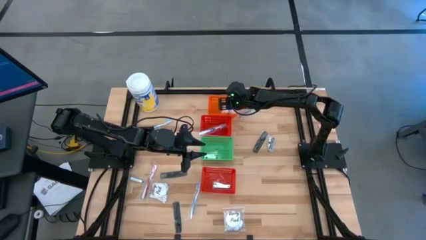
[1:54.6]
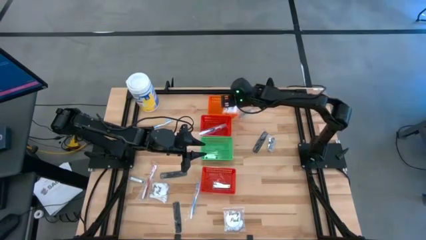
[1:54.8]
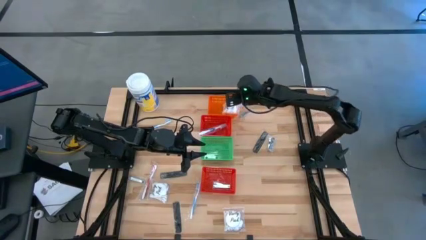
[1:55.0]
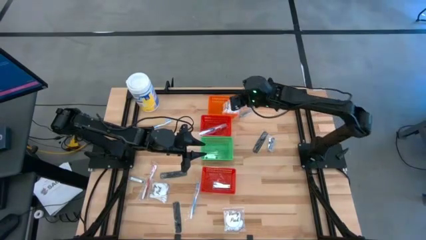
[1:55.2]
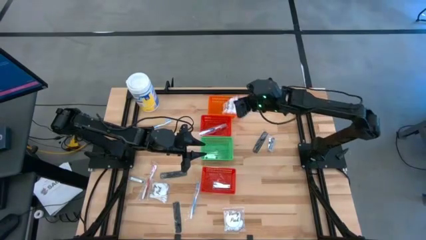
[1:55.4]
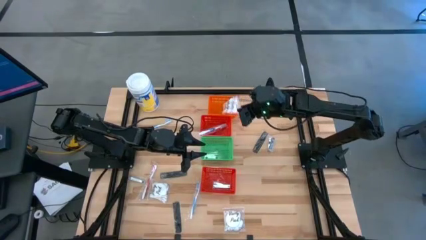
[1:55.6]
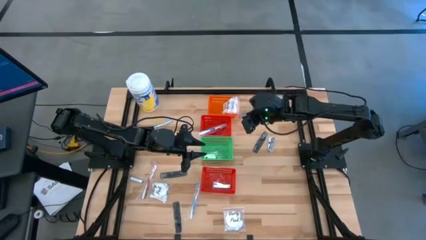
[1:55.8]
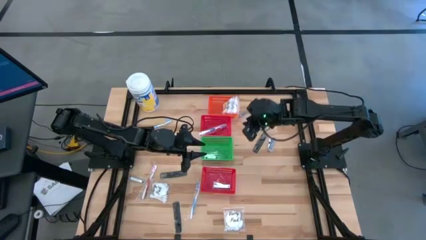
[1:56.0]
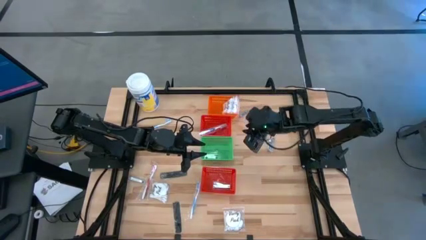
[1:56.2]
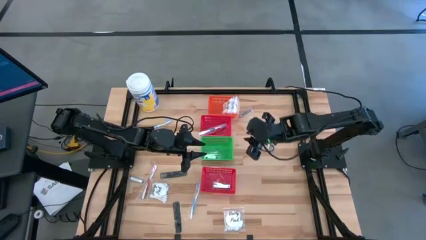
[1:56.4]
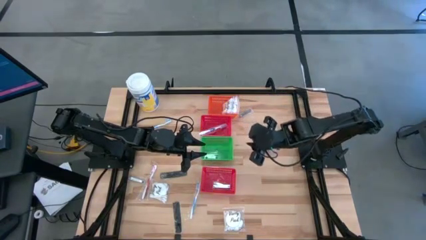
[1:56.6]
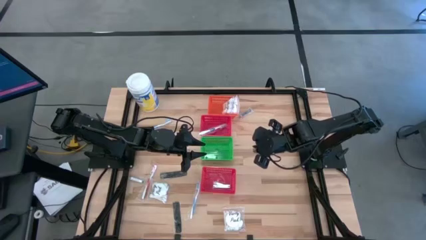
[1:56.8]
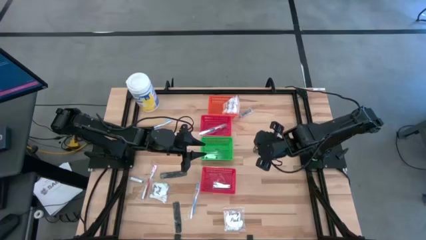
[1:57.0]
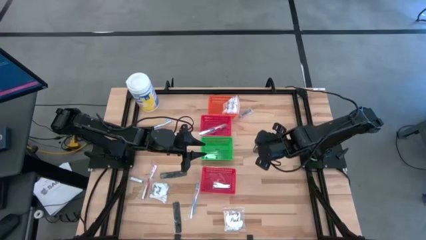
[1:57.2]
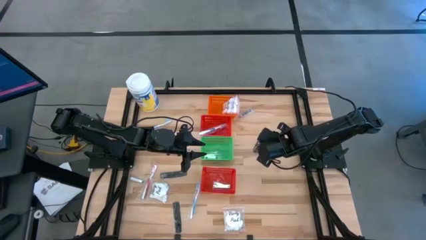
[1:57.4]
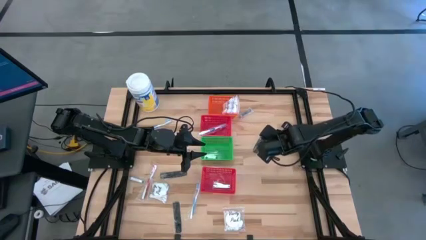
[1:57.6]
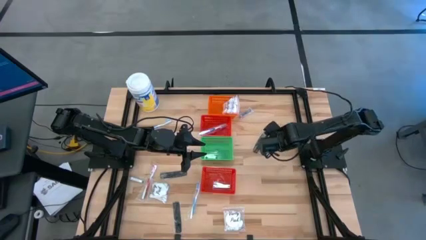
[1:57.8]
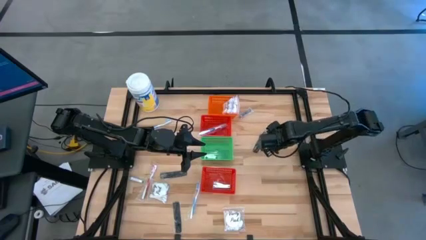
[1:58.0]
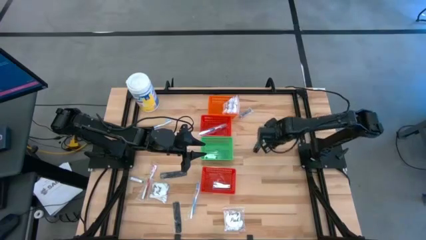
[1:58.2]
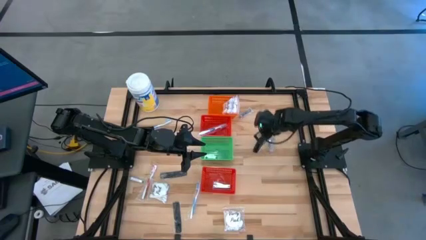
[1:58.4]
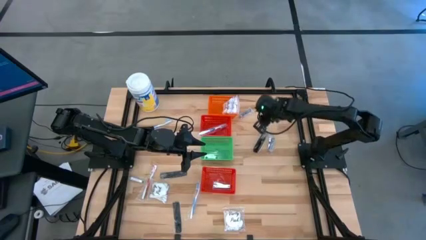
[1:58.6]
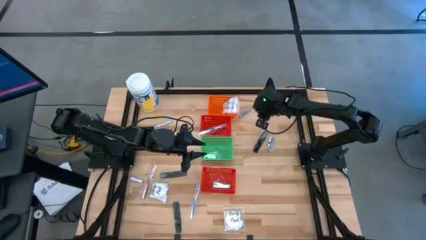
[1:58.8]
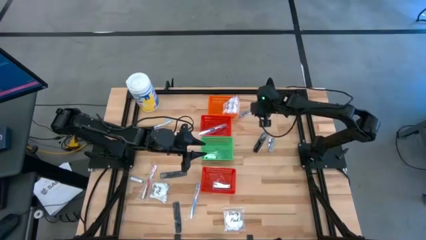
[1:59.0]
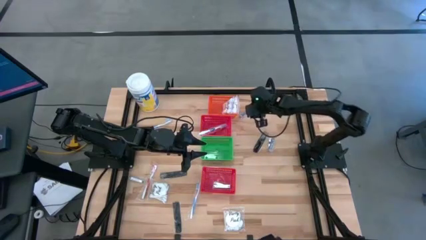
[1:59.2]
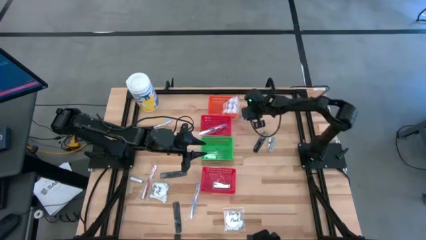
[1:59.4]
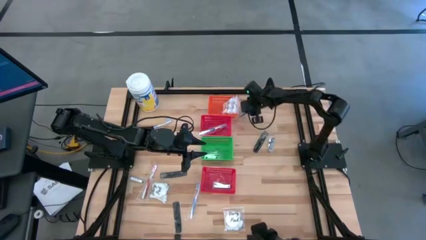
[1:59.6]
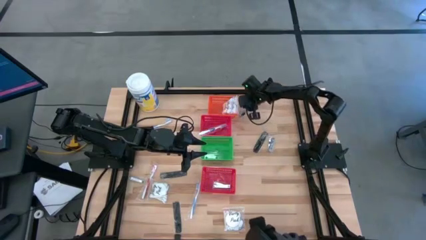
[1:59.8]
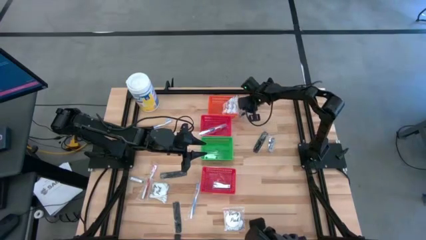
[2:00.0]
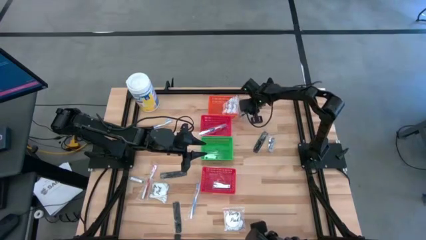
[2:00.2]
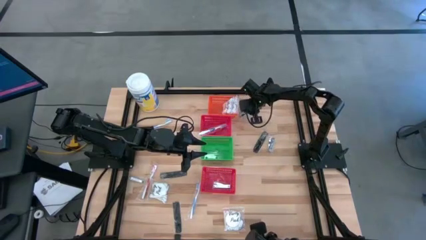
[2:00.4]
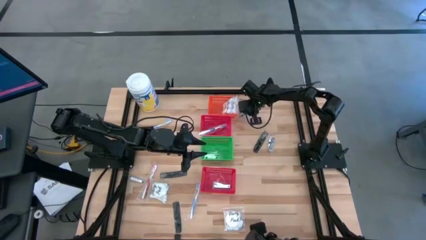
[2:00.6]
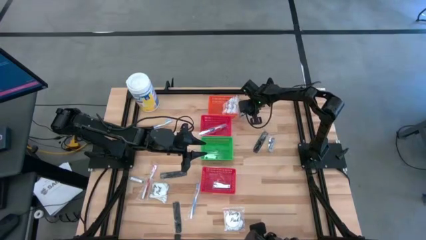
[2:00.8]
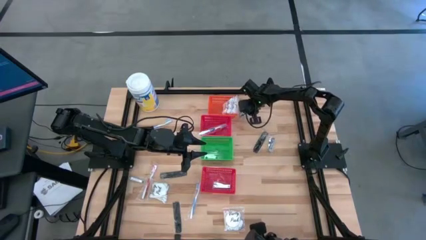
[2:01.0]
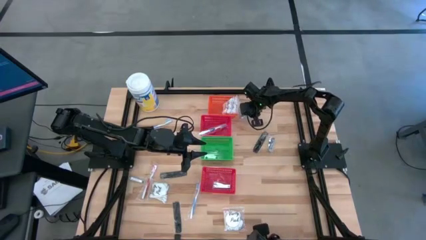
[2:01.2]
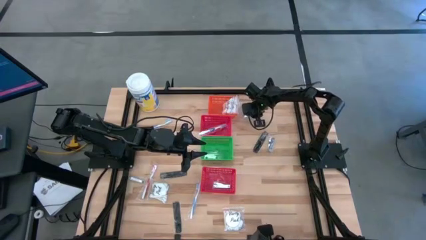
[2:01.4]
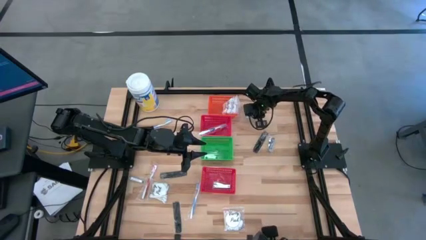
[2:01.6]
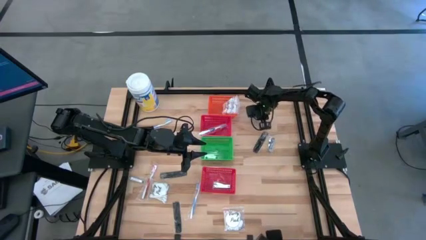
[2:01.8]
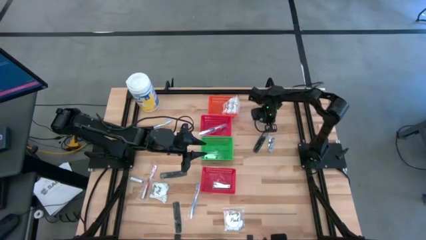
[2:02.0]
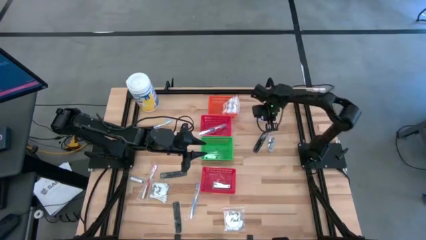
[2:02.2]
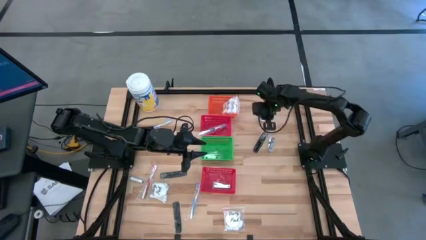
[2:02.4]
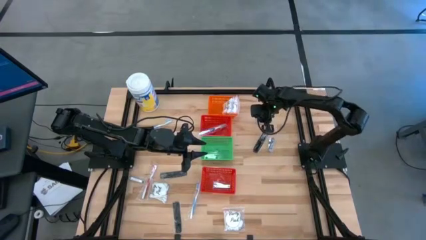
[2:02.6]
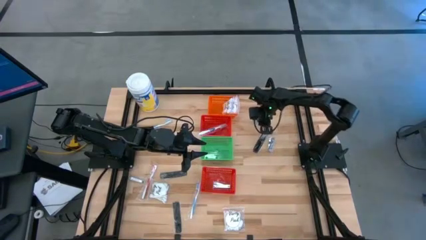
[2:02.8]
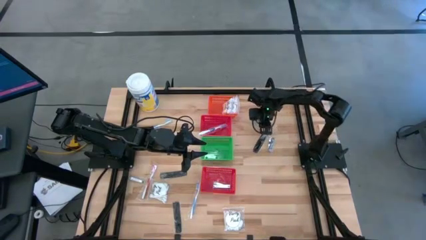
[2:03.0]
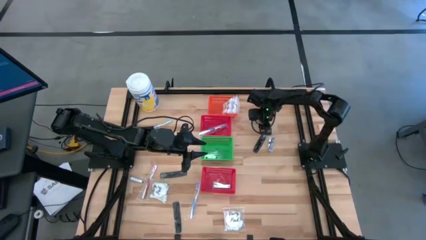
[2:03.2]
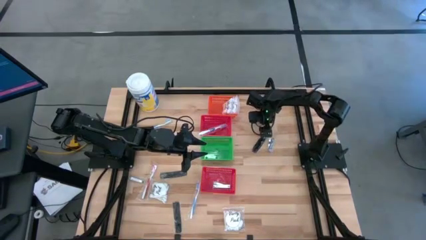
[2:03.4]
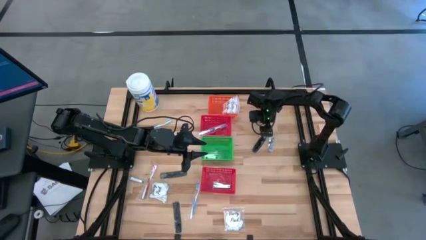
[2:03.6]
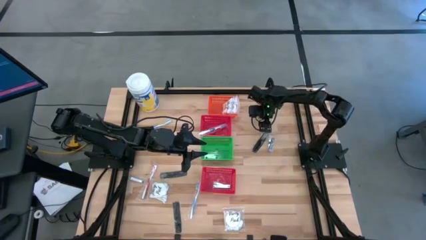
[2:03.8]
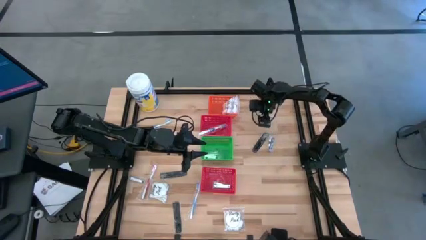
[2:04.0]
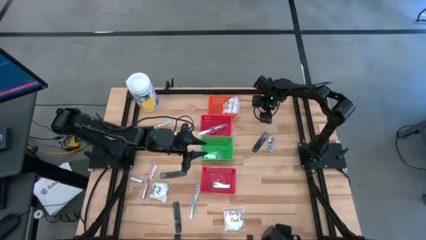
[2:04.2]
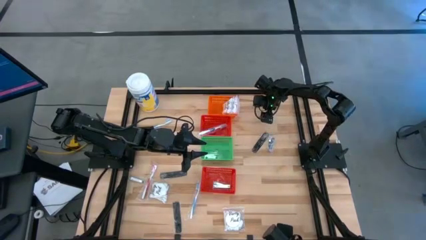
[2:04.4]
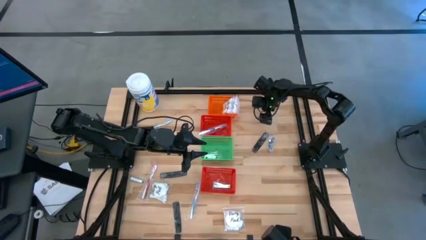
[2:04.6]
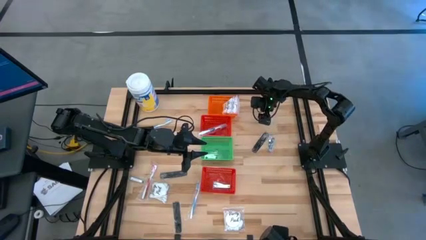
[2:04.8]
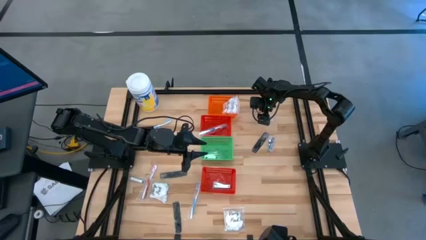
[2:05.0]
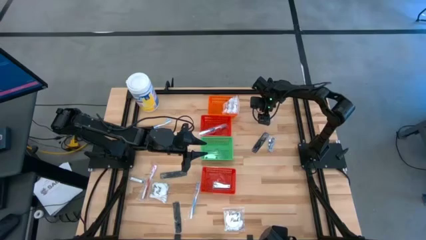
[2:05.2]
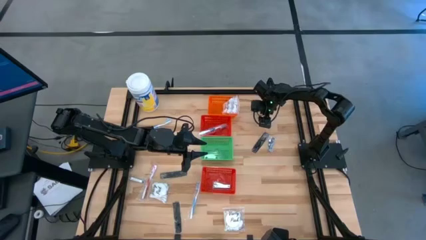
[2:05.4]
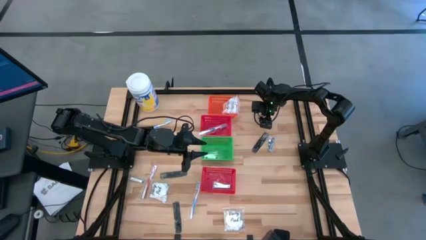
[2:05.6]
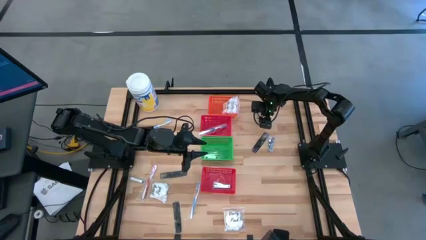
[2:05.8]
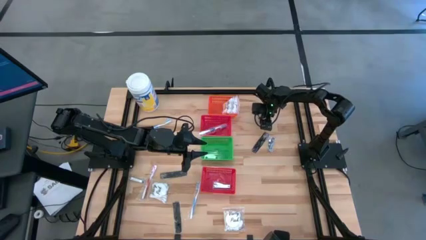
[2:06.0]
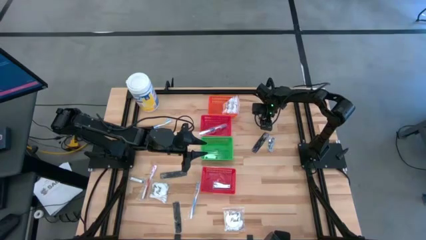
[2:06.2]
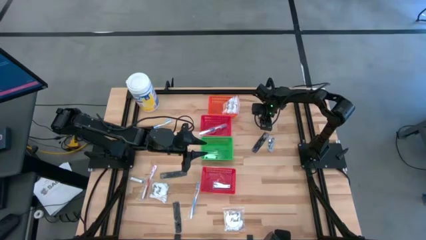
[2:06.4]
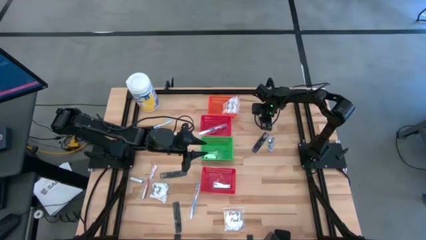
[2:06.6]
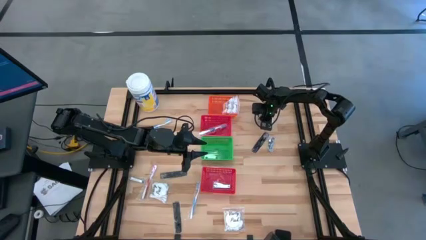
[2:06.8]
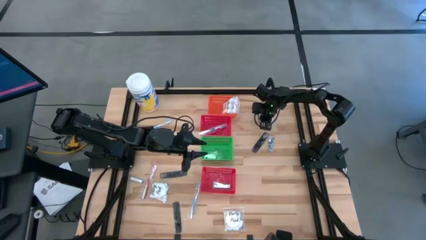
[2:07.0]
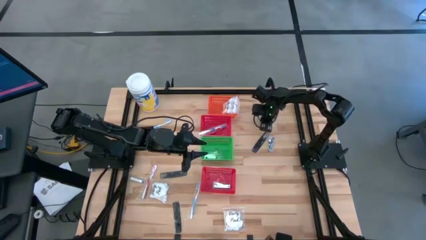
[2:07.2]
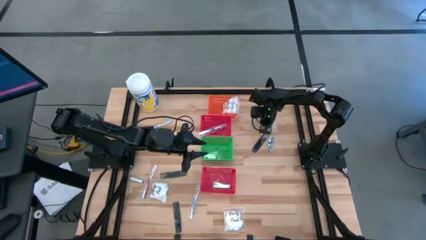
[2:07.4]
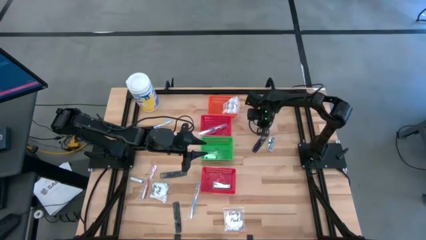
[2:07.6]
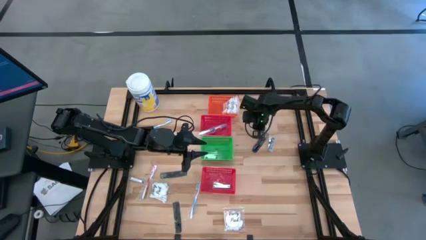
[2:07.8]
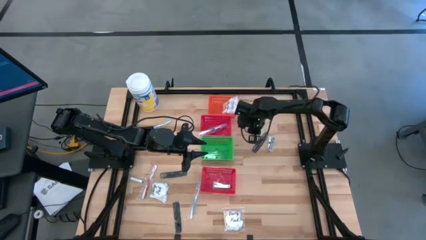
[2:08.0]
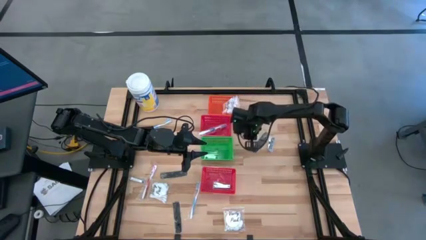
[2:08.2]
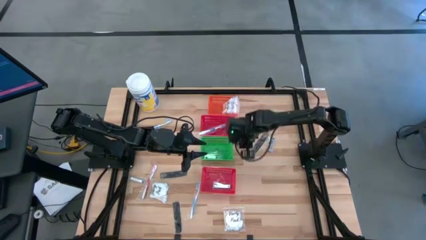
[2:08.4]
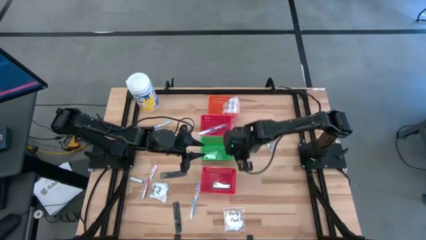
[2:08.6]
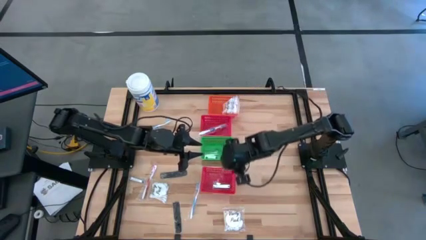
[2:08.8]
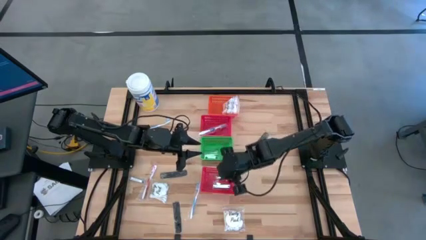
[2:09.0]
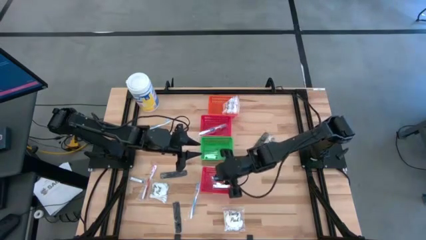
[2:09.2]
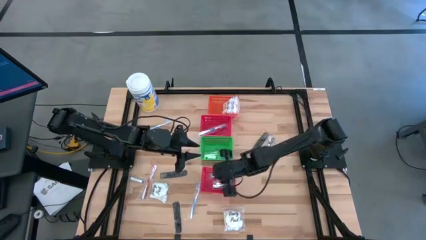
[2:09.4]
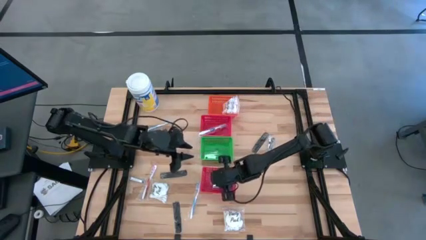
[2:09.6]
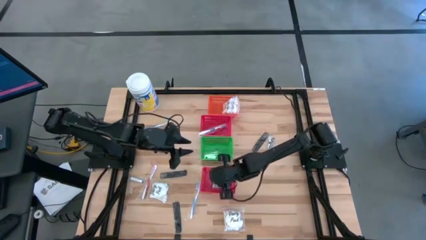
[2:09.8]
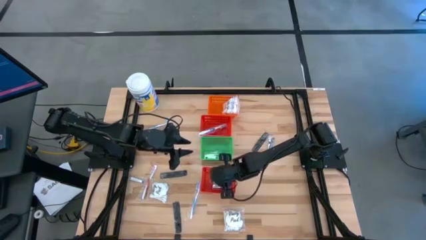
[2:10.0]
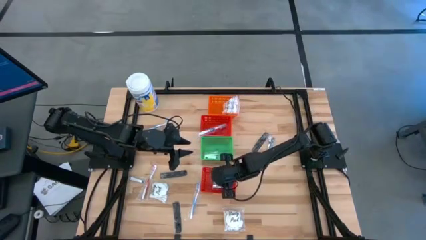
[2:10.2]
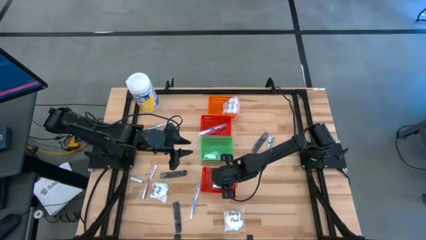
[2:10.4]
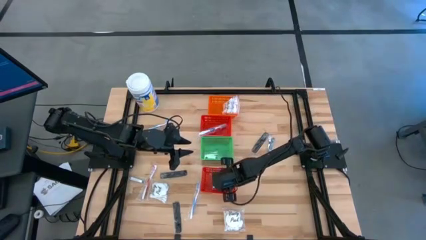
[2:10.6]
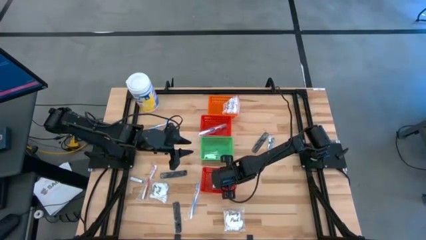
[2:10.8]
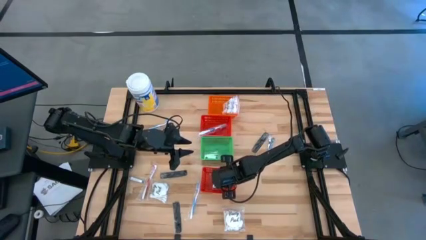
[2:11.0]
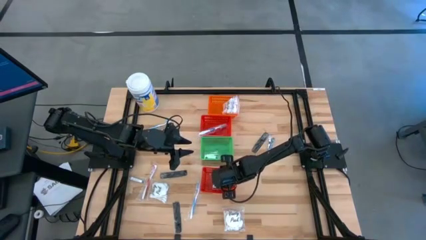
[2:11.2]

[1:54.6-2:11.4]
Task: Pick & Place Travel size toiletries
Put the silver nail clipper into the bottom red basket
